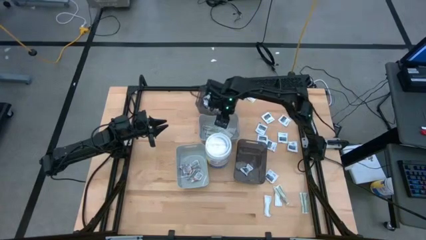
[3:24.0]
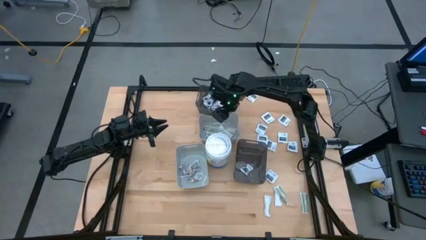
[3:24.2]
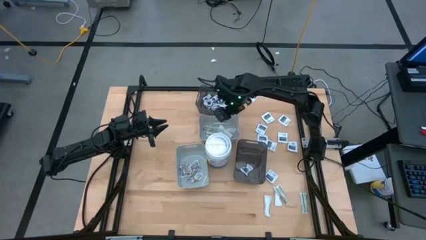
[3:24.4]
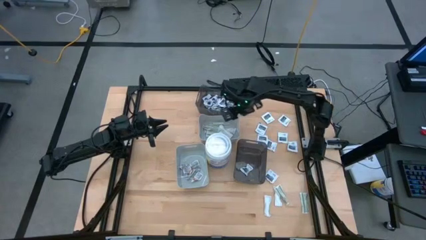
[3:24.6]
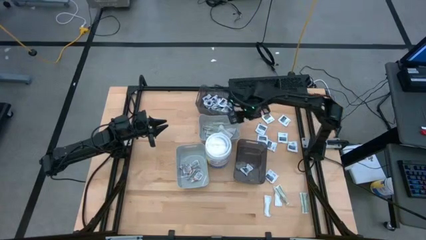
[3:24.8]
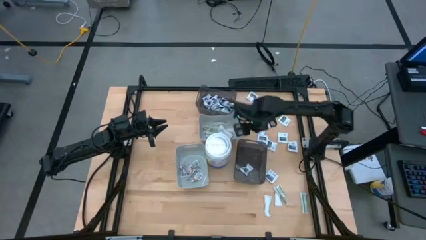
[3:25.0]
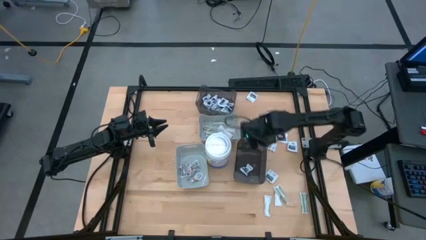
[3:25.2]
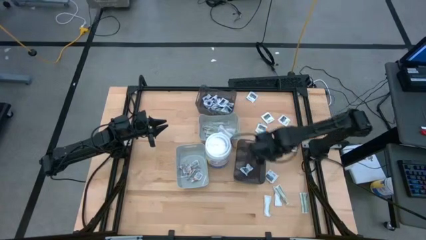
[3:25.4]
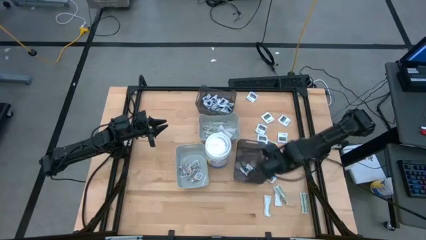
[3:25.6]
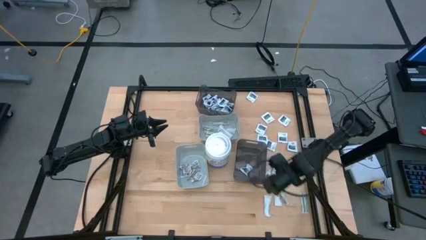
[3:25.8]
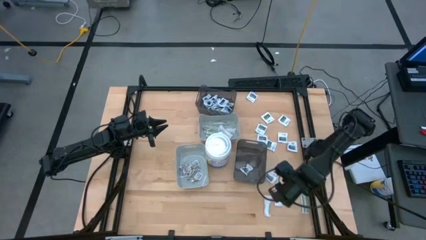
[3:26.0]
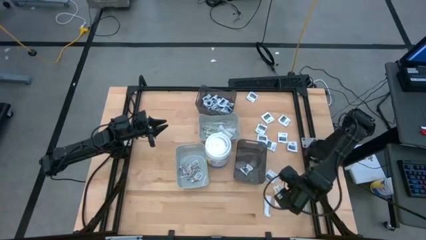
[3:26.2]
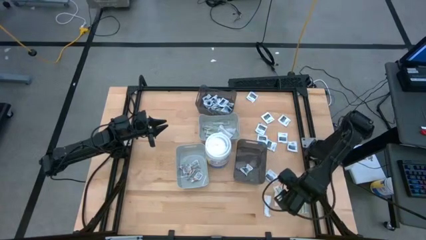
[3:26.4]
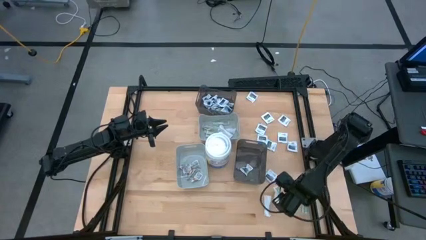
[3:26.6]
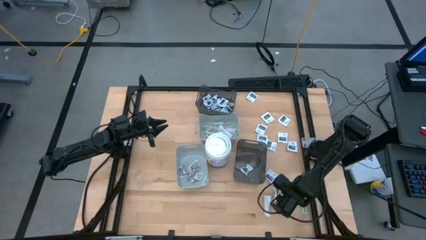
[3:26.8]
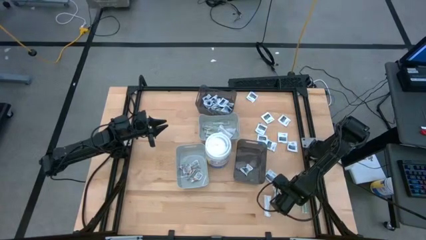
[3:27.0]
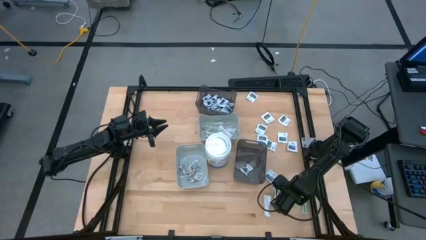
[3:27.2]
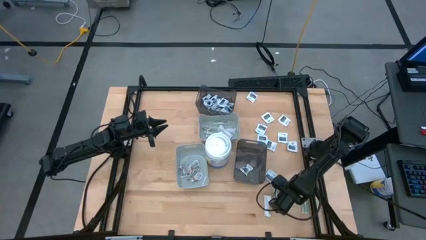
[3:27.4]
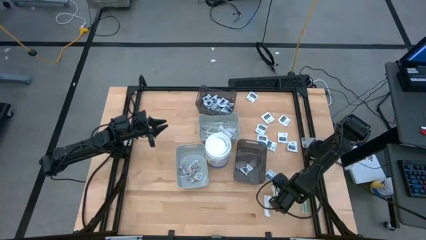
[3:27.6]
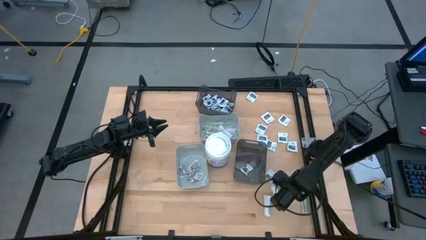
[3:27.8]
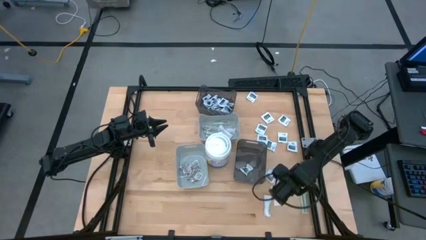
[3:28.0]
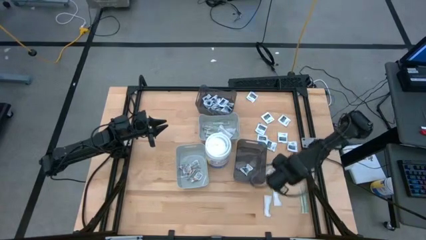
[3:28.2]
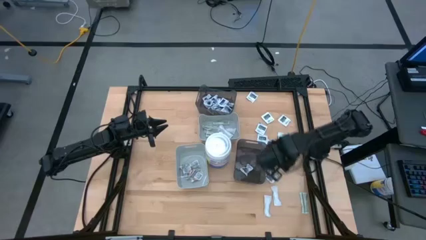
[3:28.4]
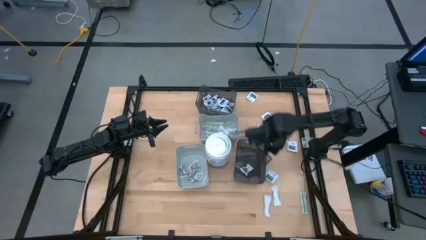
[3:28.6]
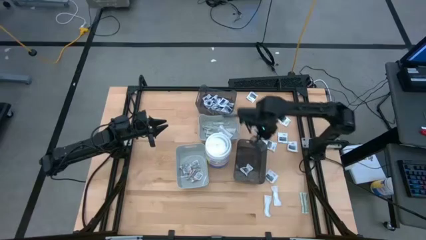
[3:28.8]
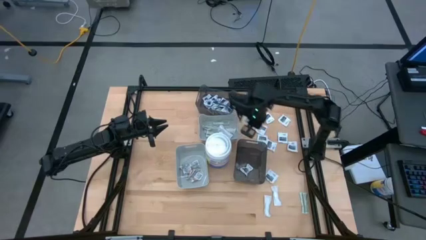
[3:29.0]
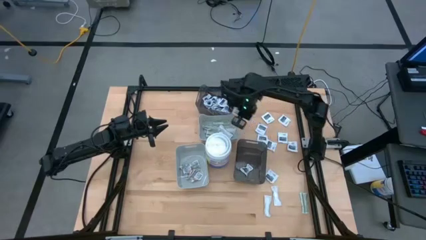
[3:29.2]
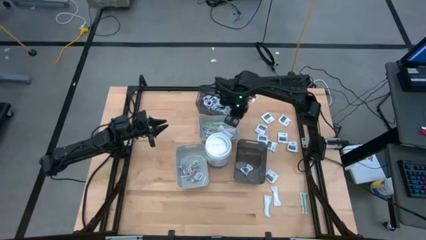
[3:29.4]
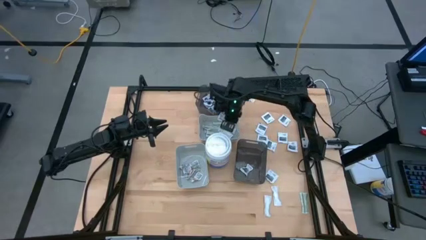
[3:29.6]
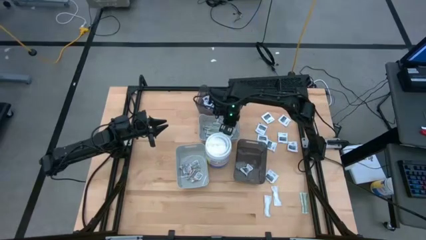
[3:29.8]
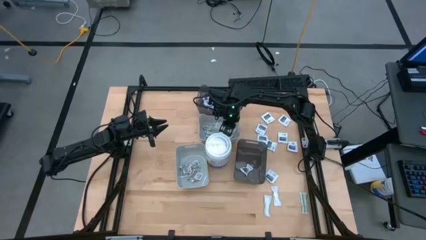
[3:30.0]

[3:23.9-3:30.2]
Task: Pick & Place First Aid Supplies
Put the bandage into the top gray bin

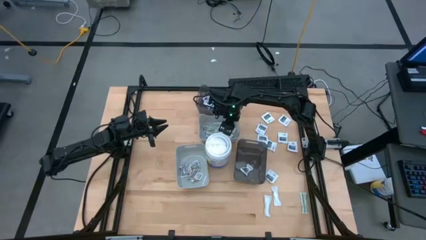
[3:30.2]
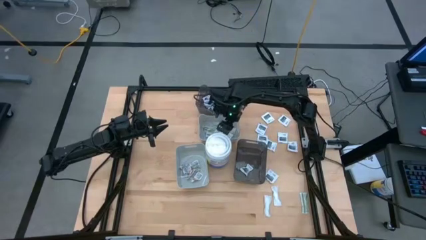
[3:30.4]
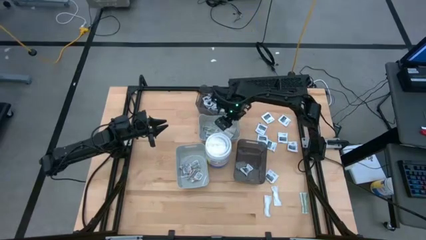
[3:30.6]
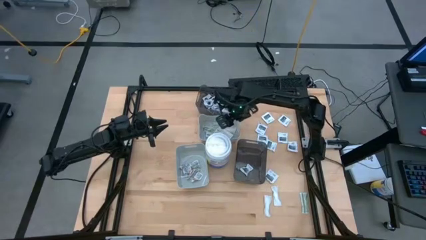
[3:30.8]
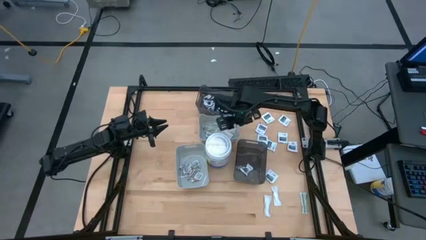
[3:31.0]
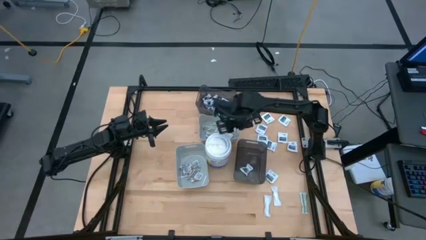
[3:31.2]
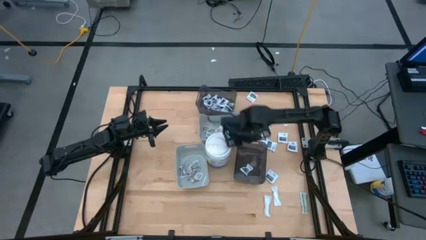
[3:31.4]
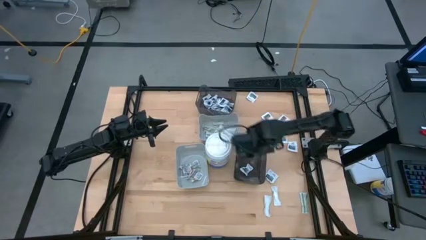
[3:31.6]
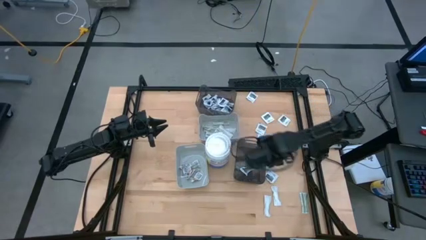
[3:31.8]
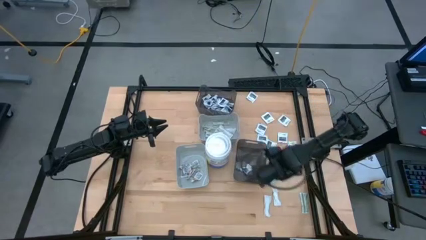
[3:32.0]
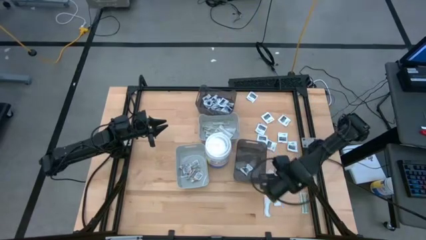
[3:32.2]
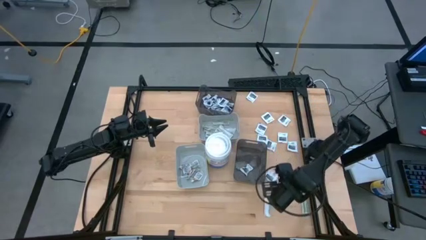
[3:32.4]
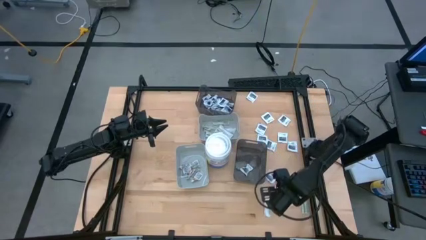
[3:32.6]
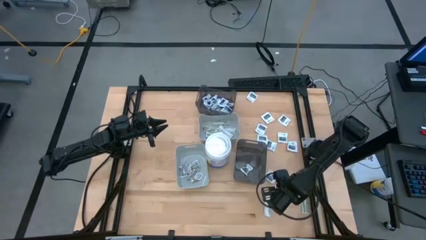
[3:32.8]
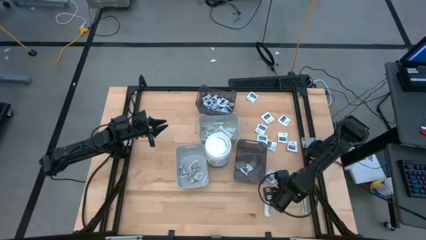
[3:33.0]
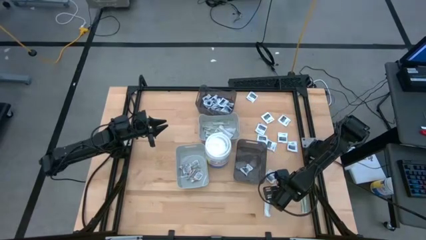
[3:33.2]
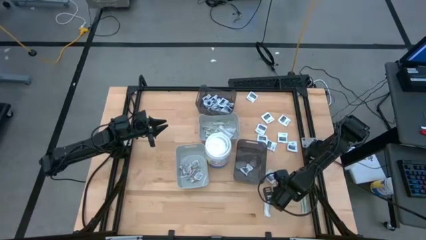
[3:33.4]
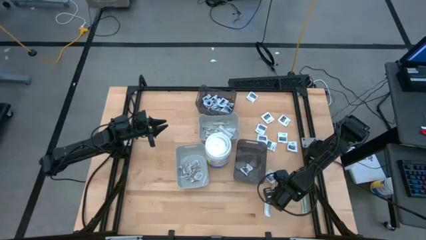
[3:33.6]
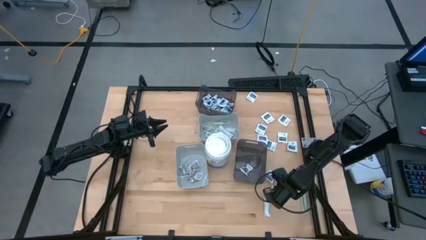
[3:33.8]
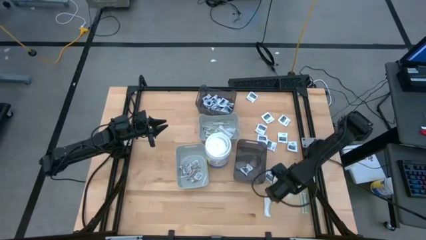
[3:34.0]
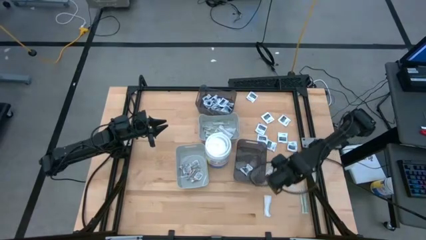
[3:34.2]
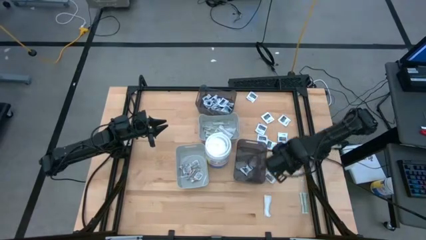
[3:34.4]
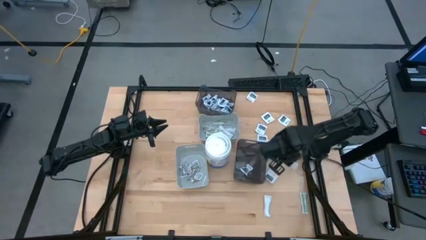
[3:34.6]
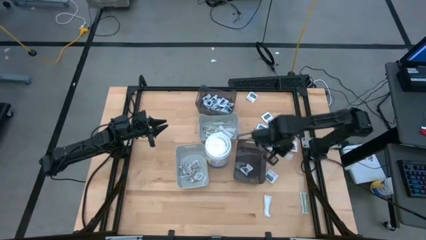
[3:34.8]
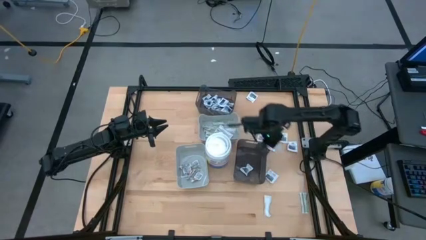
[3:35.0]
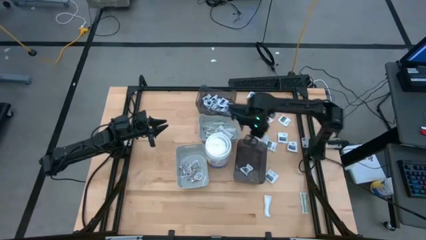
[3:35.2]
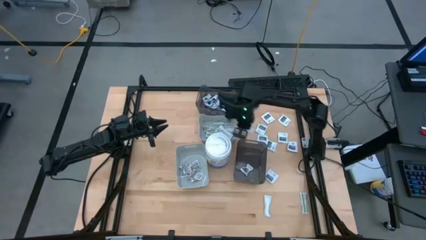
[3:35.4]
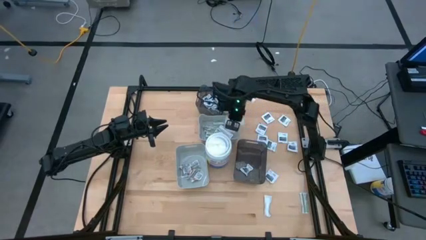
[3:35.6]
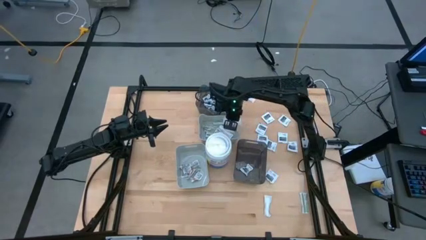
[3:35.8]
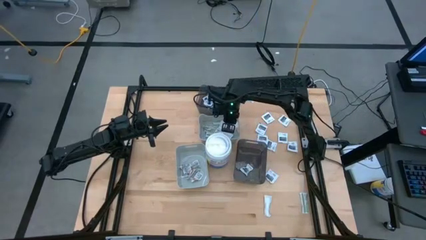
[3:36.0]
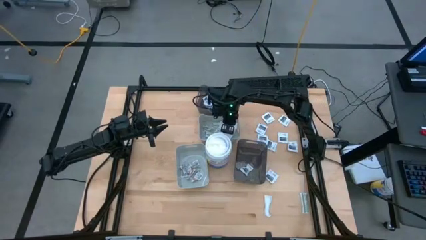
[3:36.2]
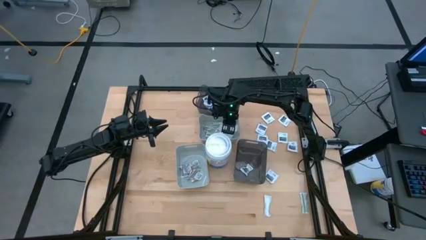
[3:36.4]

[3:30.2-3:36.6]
Put the bandage into the top gray bin

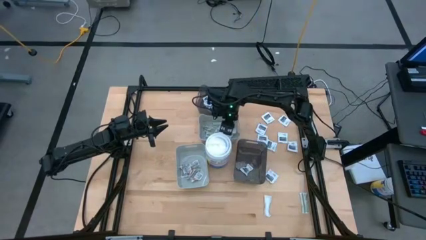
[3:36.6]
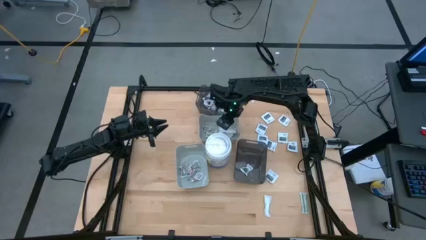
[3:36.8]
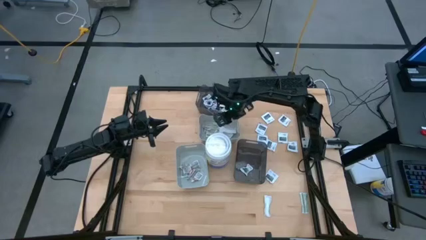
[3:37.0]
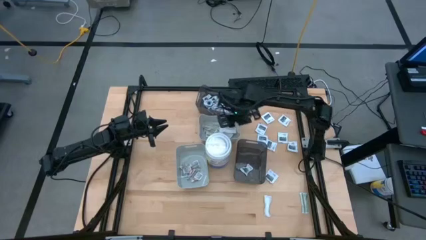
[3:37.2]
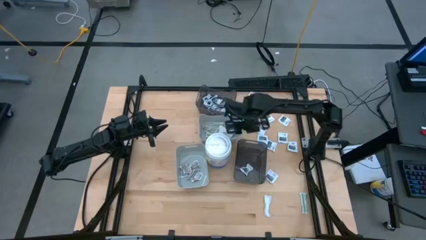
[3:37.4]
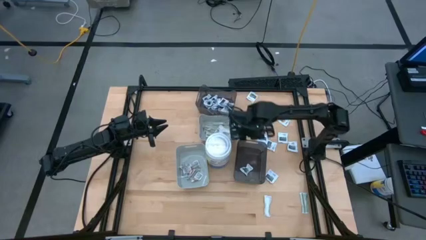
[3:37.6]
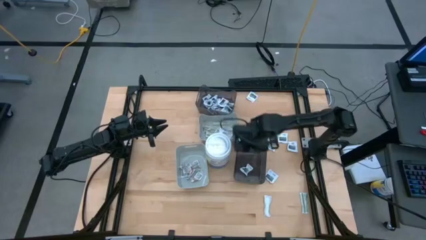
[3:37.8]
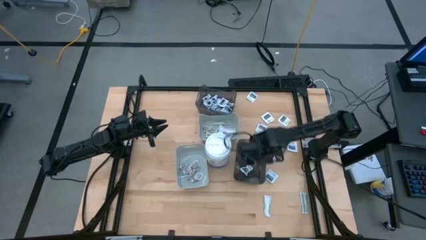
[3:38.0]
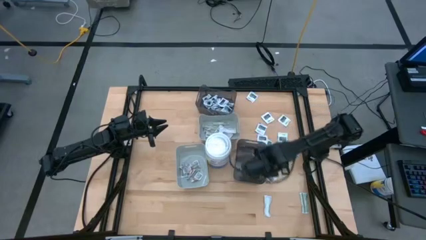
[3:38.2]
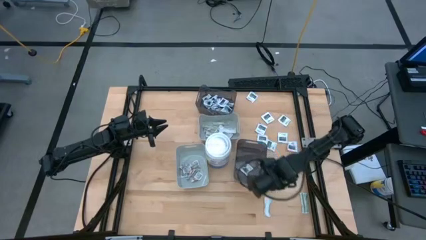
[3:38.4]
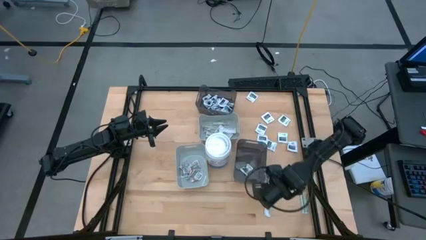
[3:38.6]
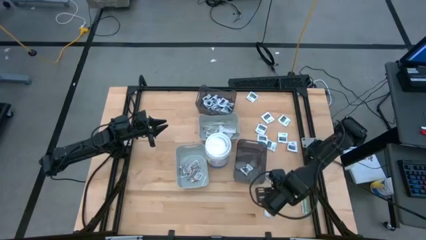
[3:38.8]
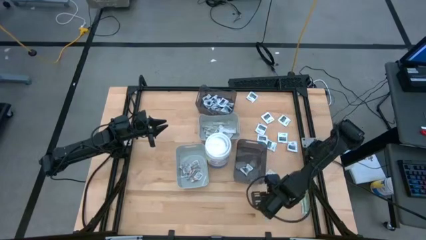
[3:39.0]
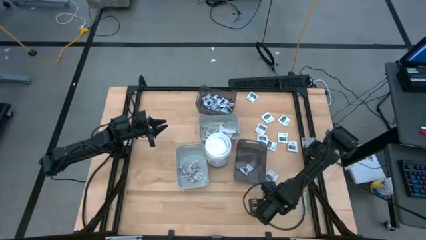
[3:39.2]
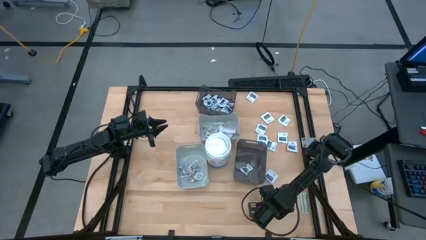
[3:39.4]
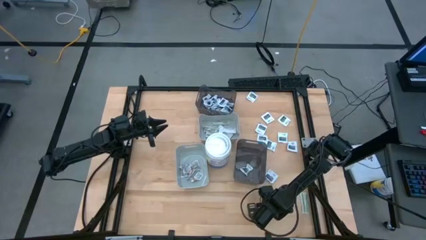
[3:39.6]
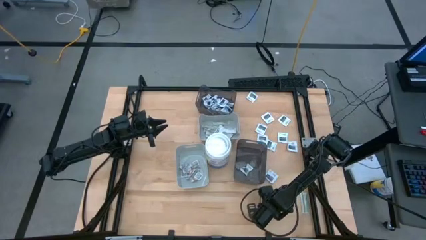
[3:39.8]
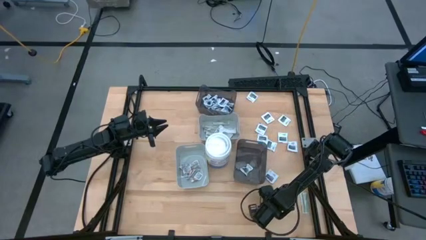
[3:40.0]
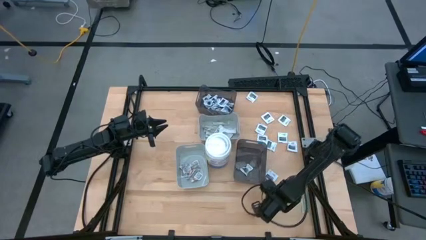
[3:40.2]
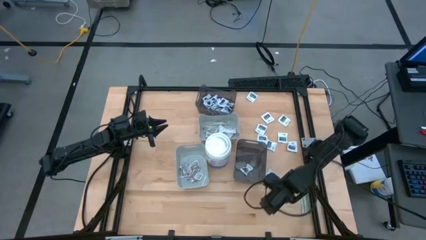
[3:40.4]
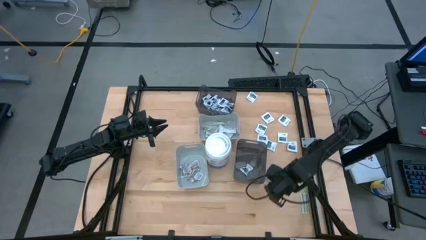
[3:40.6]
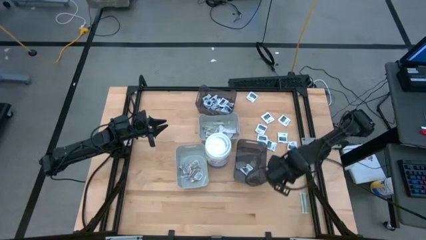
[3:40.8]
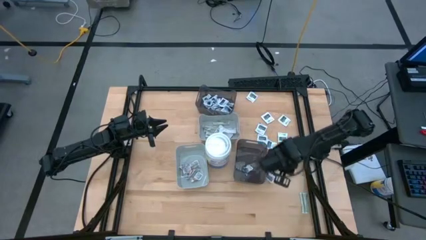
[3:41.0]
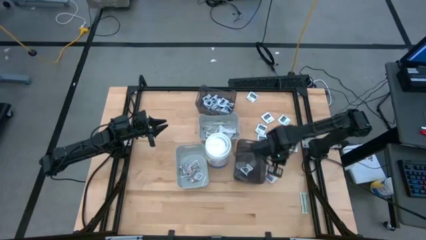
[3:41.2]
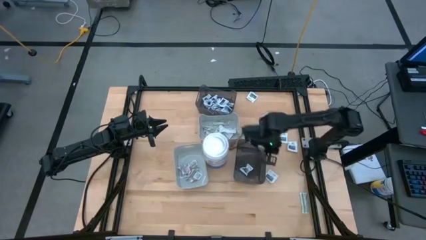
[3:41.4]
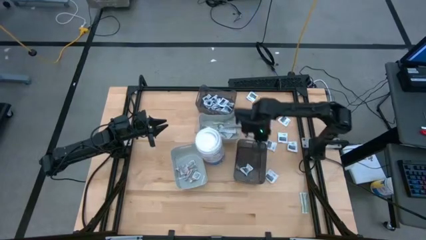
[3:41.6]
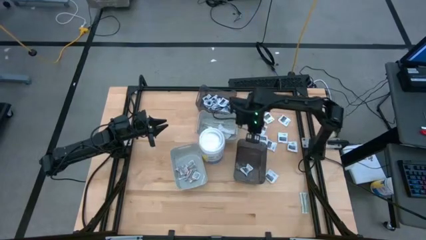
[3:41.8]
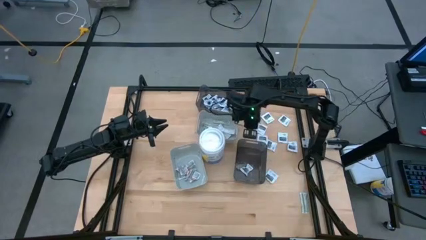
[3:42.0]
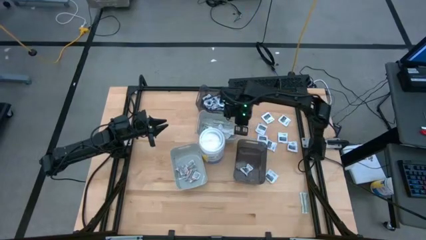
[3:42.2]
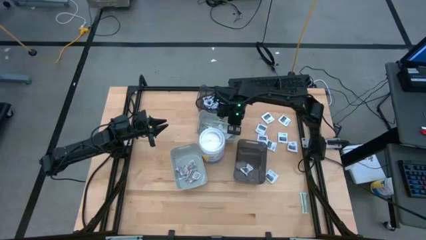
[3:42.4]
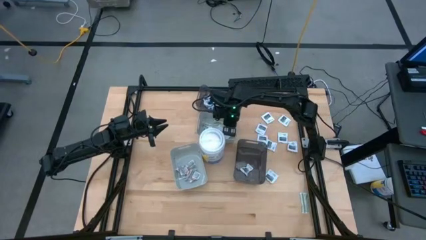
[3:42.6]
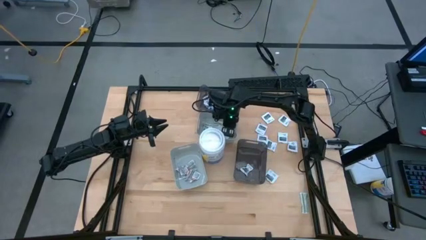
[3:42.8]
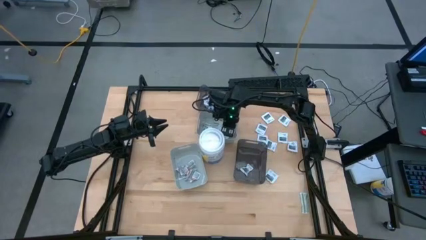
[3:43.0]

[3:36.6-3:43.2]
Put the bandage into the top gray bin
